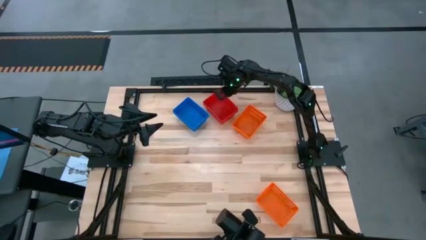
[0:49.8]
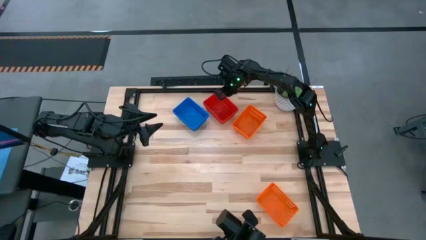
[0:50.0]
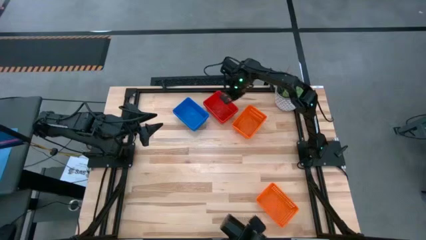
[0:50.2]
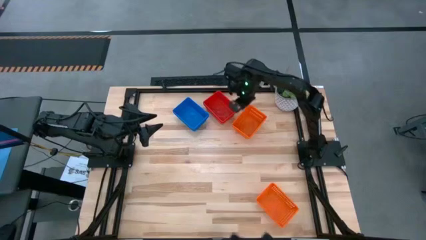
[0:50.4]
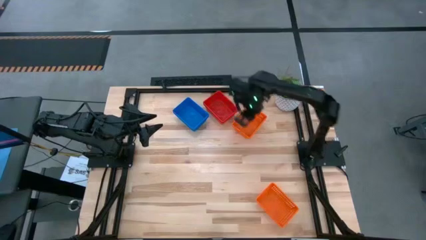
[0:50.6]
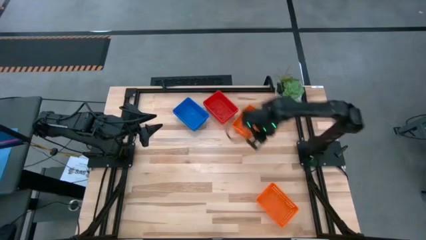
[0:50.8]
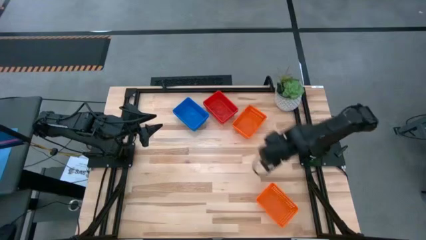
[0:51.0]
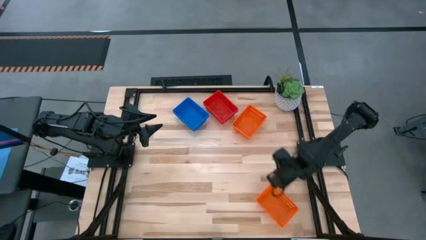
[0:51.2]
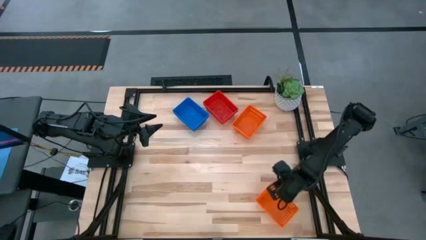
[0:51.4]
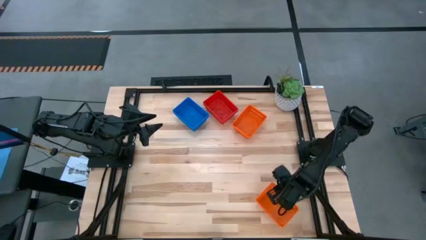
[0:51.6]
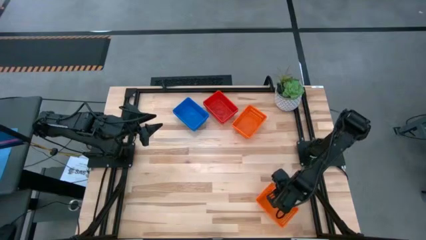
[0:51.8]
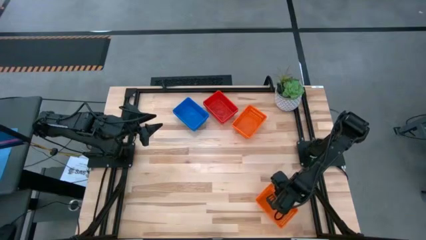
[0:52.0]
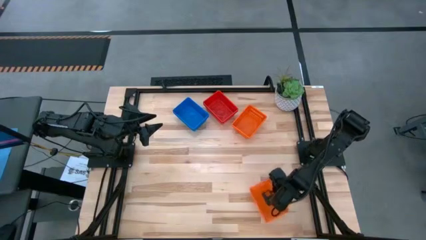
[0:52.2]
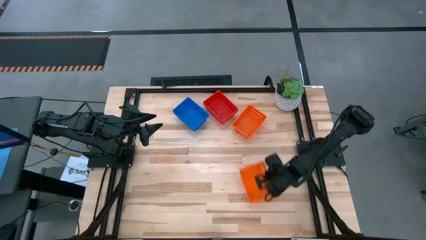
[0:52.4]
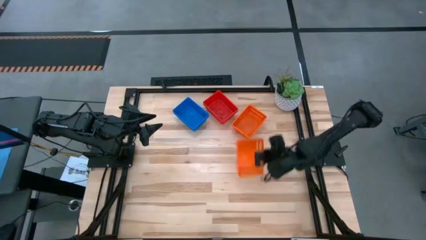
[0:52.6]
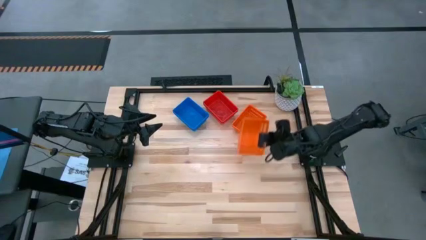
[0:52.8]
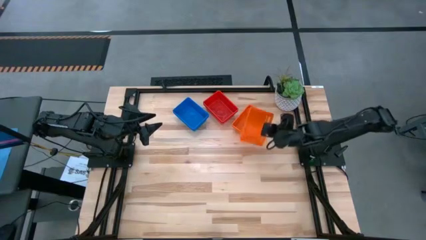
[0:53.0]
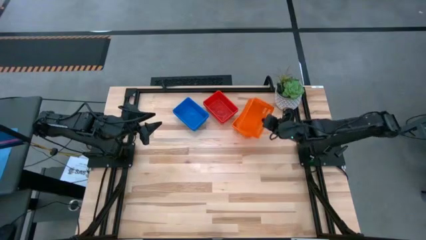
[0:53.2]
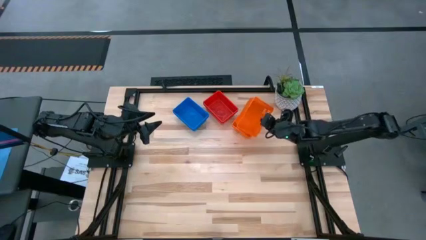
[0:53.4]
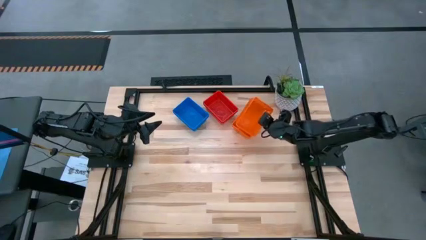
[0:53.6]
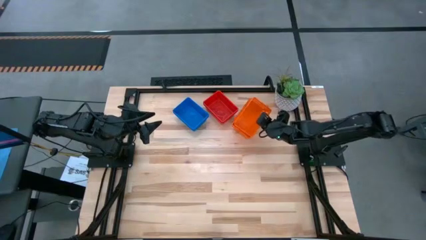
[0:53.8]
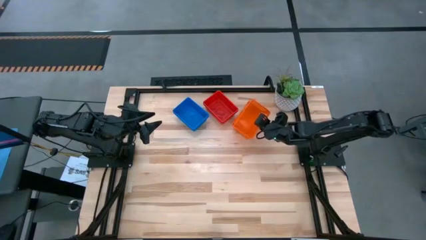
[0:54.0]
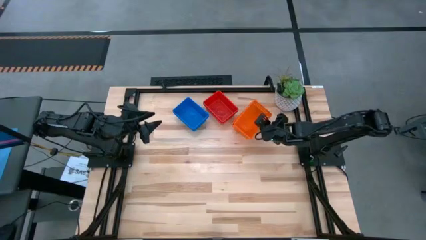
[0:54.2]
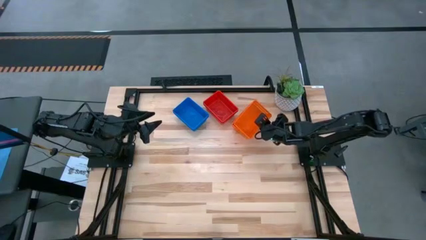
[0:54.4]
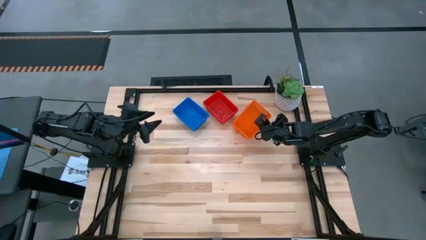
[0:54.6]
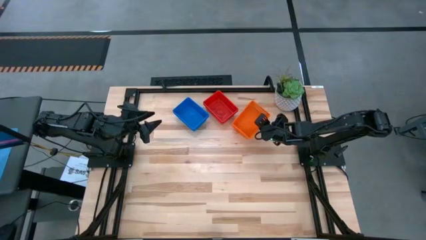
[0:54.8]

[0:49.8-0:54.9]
Stack the bottom orange bin on the top orange bins

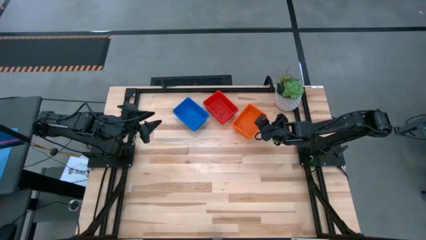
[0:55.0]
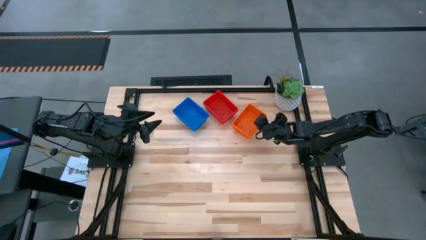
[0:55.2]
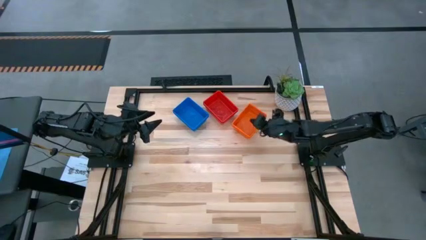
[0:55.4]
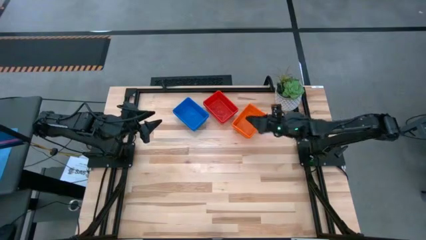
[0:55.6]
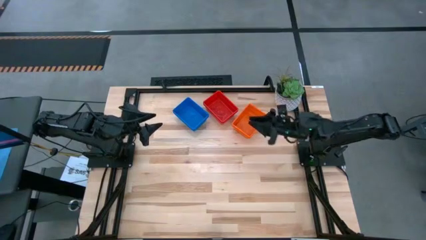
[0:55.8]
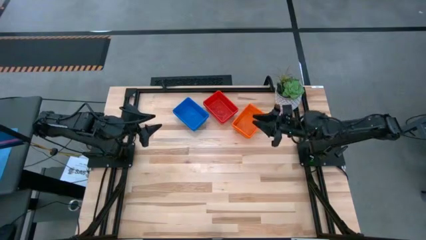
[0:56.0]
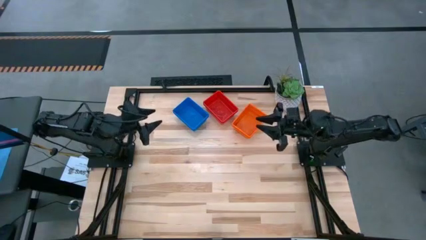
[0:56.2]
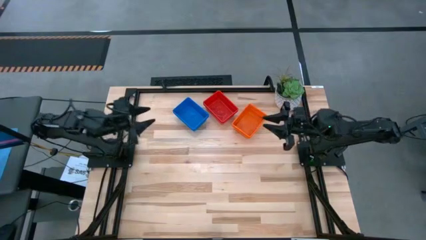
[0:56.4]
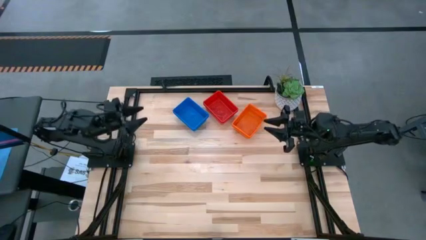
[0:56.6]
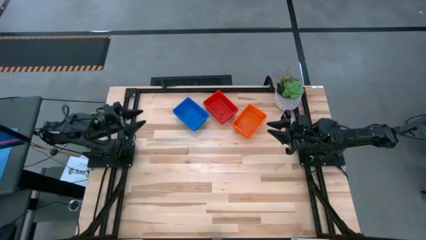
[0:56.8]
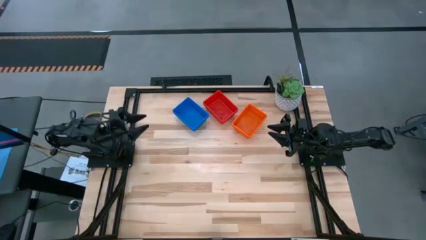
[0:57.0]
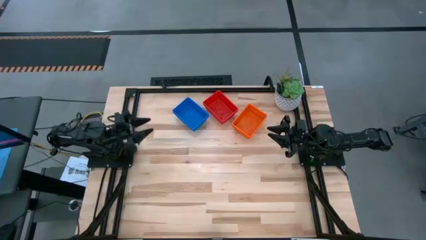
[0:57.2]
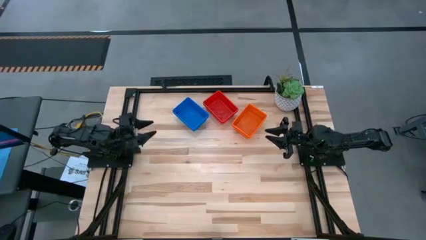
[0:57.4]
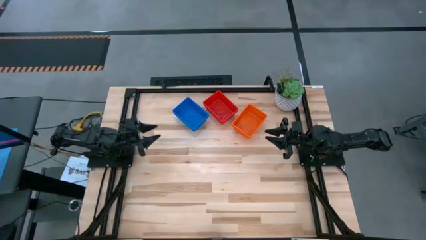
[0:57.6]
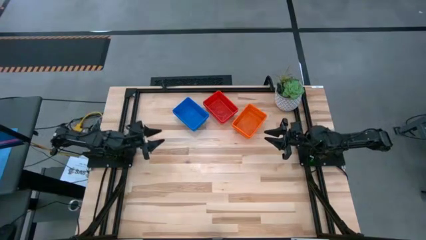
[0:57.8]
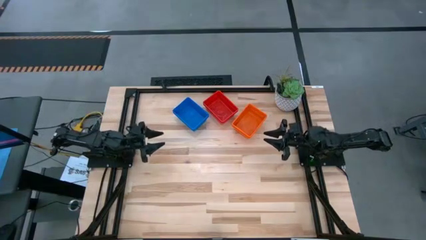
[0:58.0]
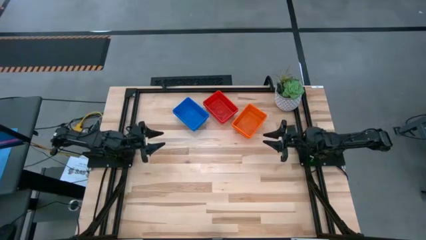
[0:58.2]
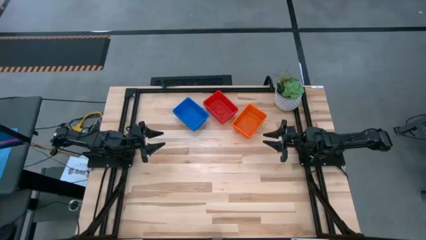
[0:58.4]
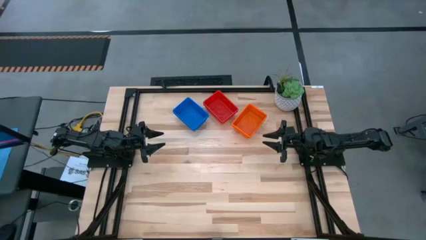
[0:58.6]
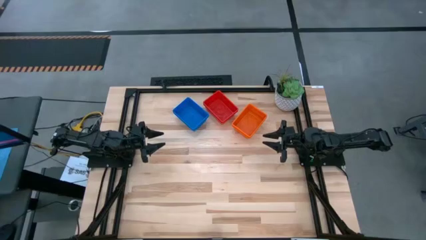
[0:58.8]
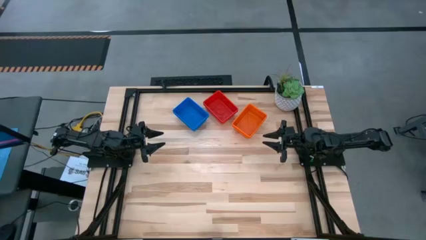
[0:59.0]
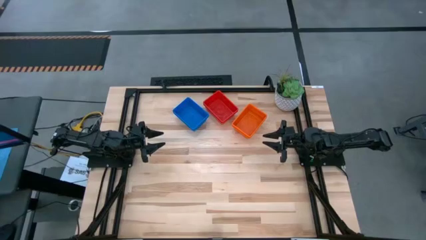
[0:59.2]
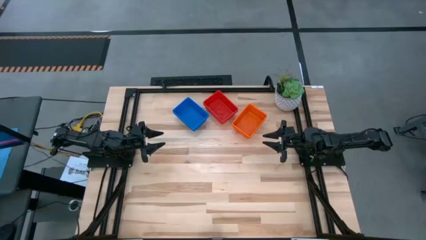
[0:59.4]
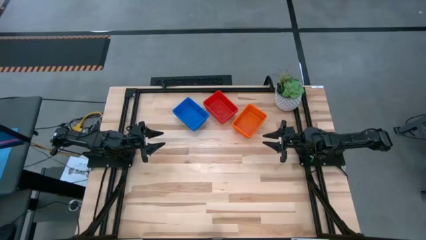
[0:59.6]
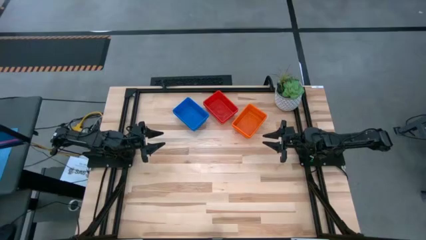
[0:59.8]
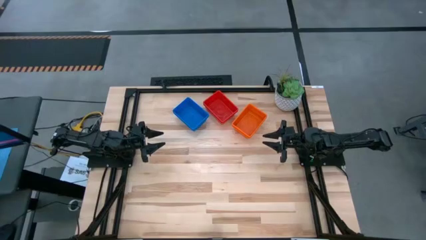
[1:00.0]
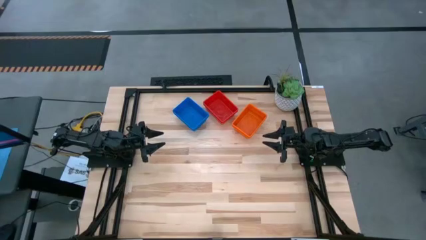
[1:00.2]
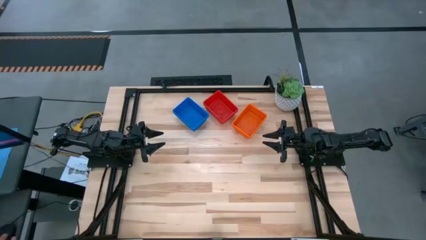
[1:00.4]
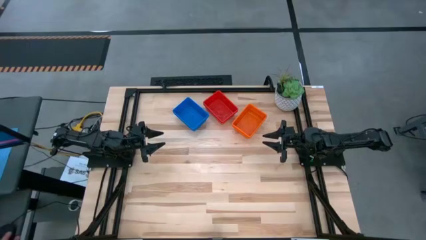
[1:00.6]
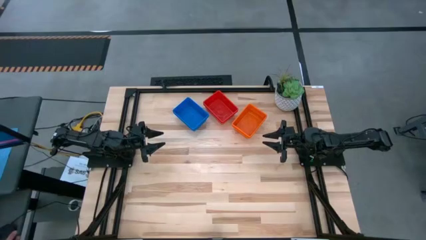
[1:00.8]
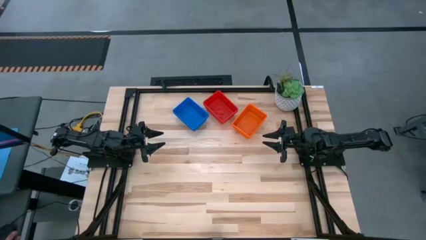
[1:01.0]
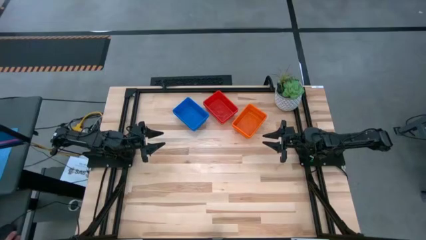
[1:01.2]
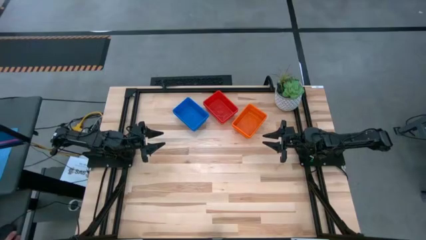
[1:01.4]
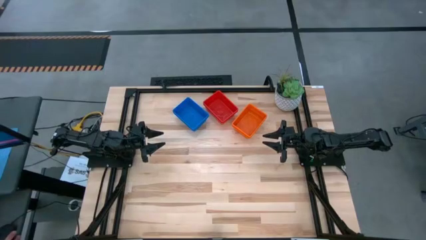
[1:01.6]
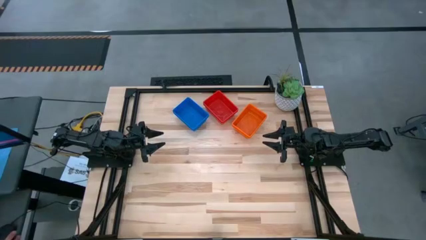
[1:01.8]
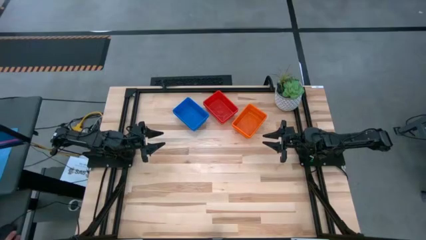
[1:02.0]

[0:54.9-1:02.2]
Return to Home Position
